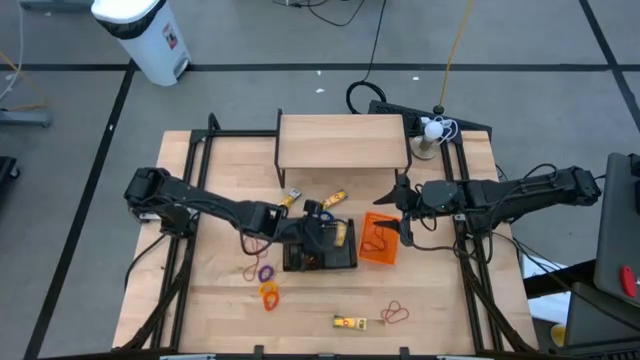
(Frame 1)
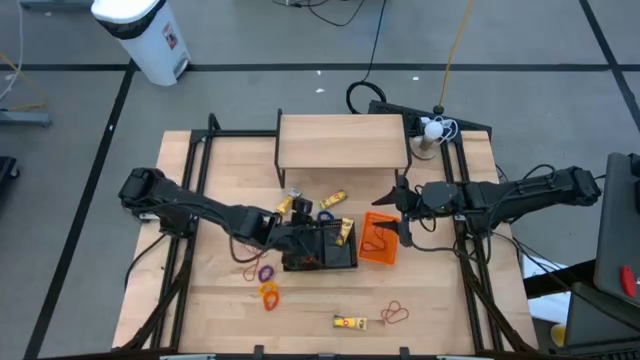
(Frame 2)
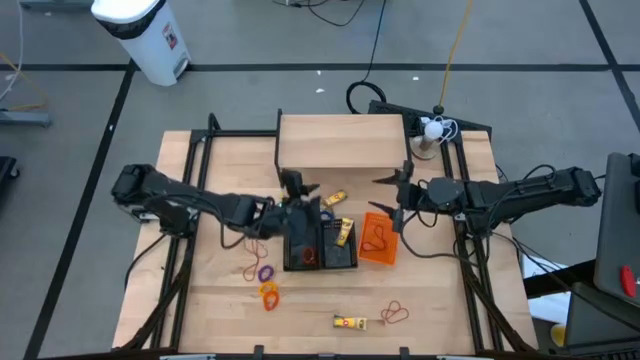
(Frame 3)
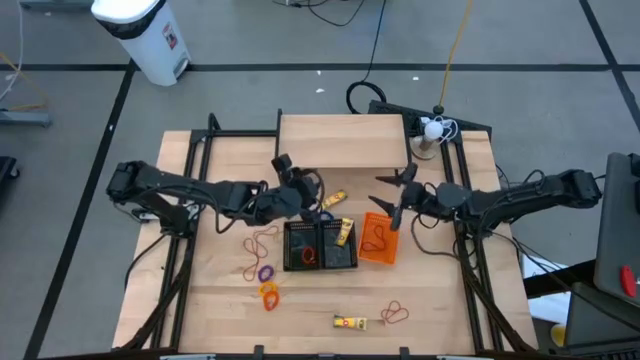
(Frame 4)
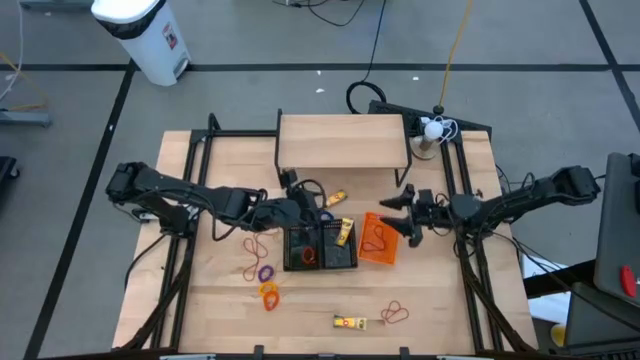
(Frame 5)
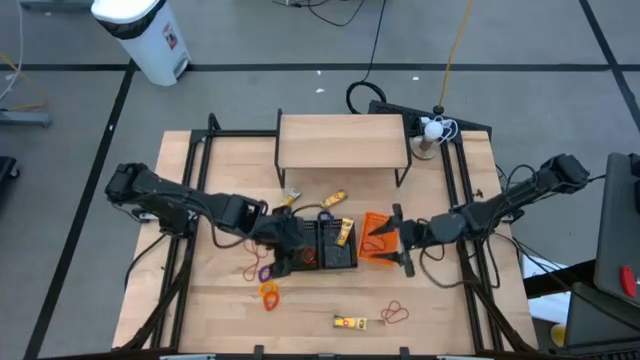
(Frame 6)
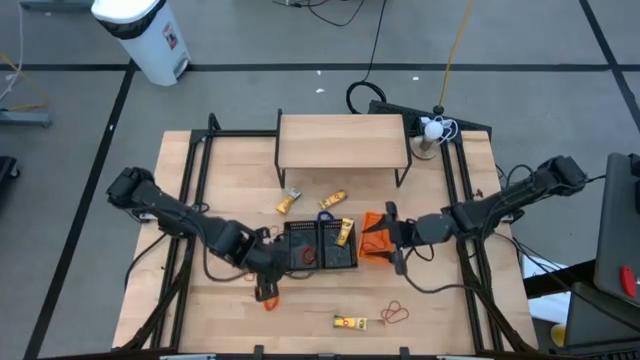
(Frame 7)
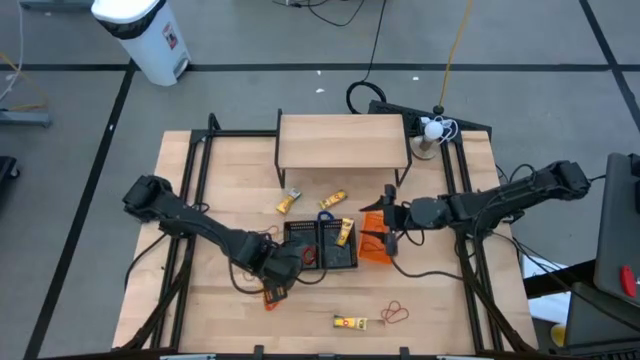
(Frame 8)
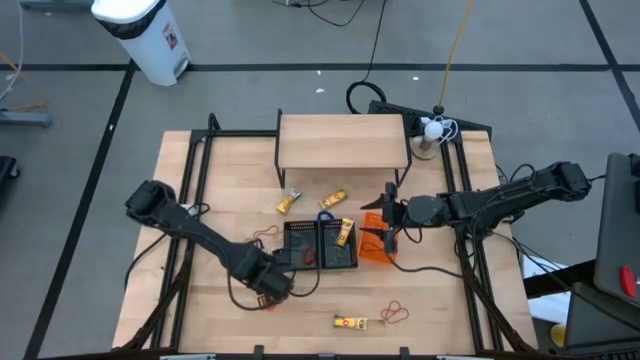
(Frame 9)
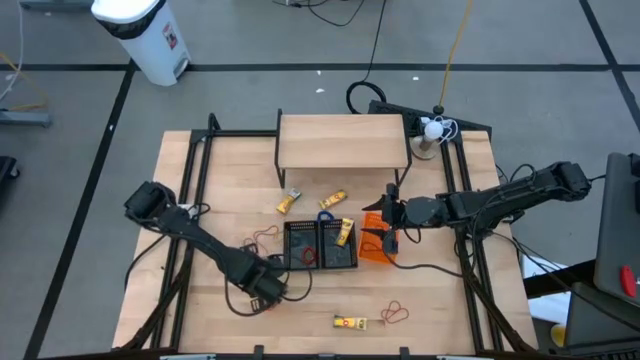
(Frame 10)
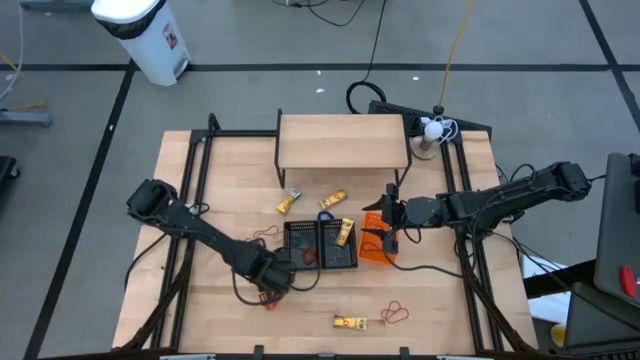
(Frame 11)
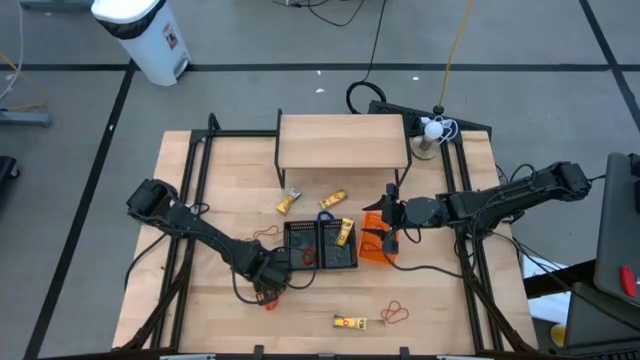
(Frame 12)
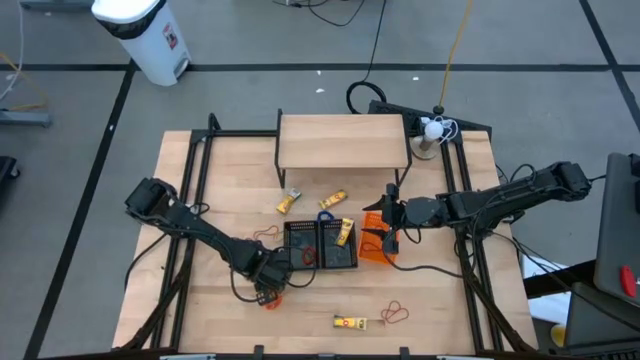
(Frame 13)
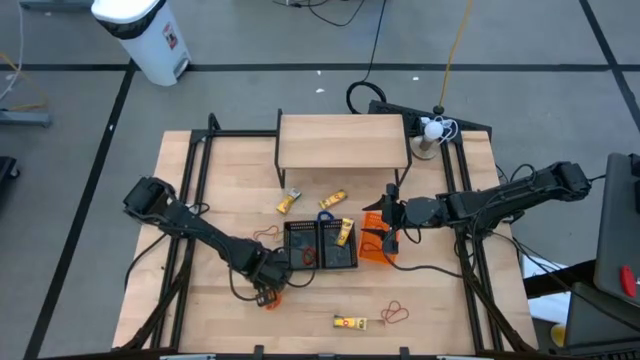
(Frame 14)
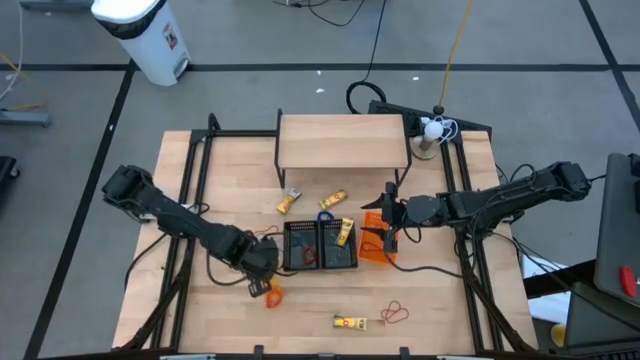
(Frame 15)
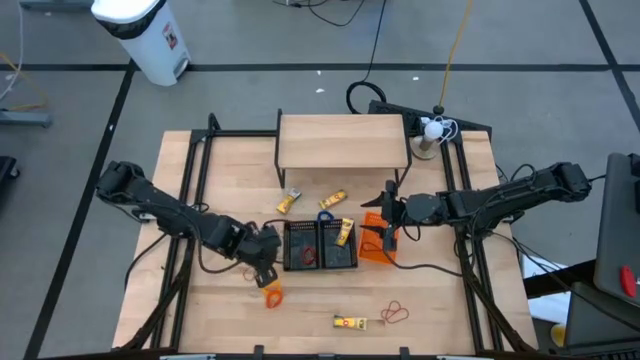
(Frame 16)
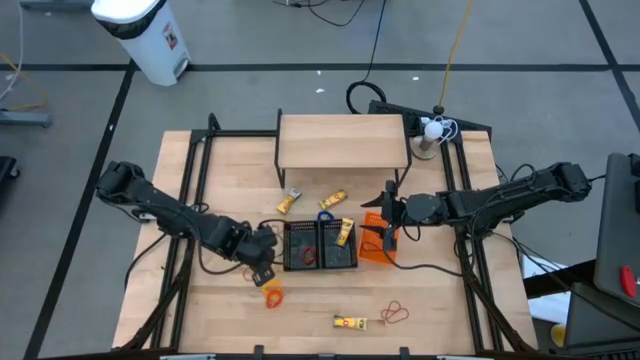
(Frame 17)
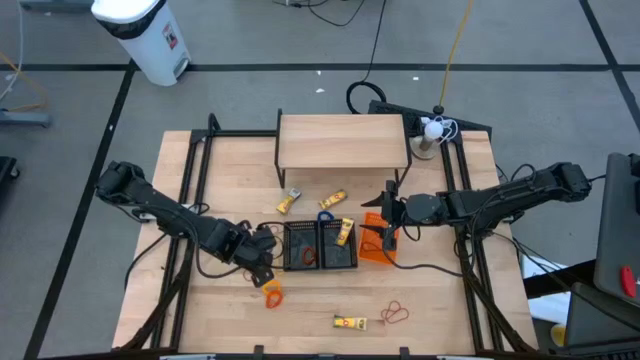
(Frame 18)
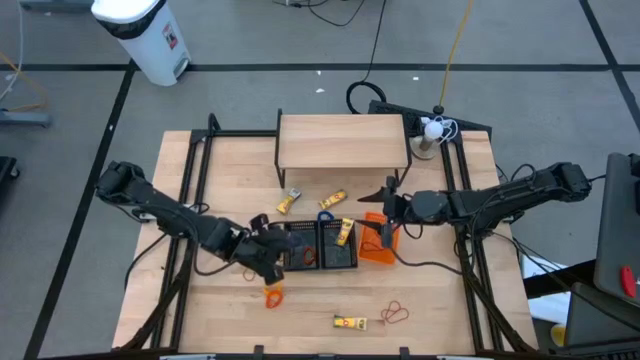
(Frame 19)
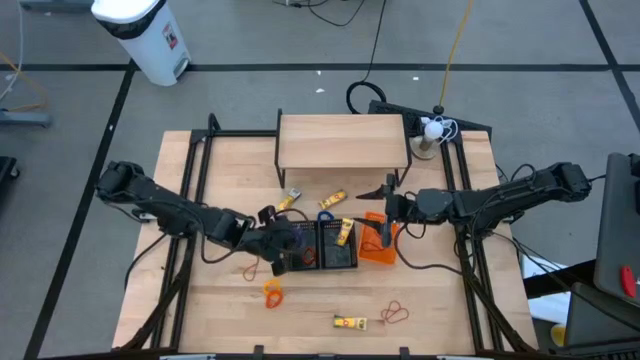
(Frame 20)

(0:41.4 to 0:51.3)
Task: Pick & Place Office Desk Supplies
Put the violet spring rubber band into the left black basket

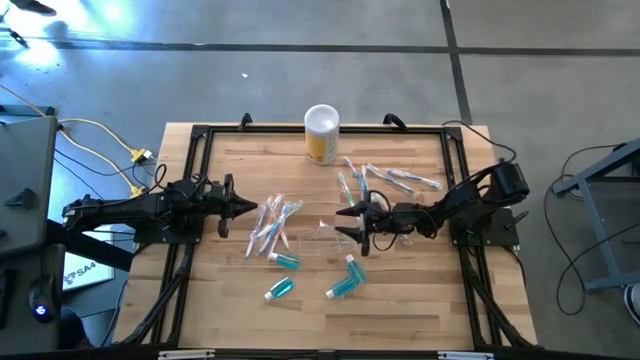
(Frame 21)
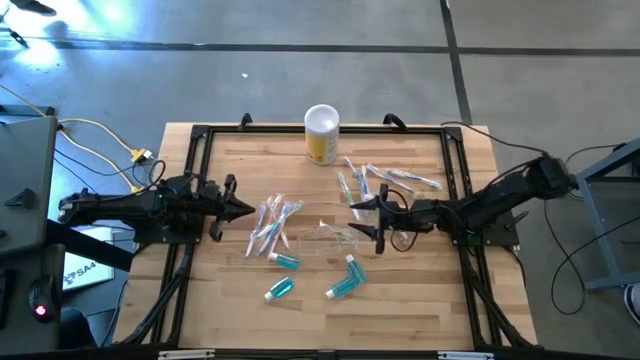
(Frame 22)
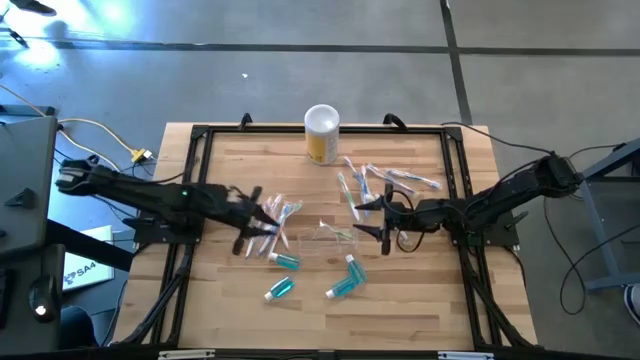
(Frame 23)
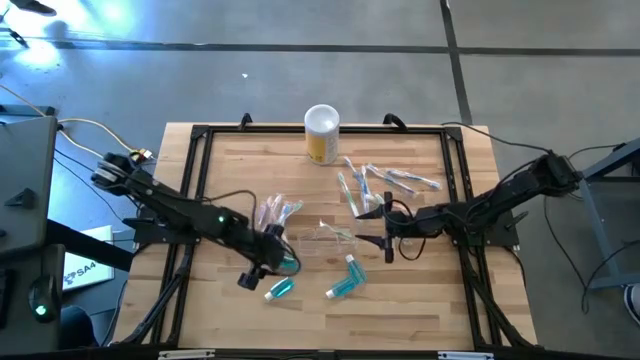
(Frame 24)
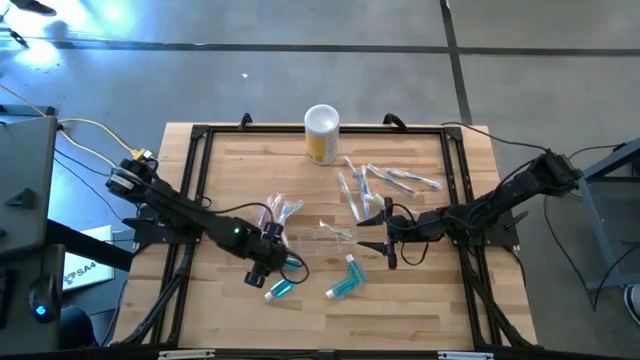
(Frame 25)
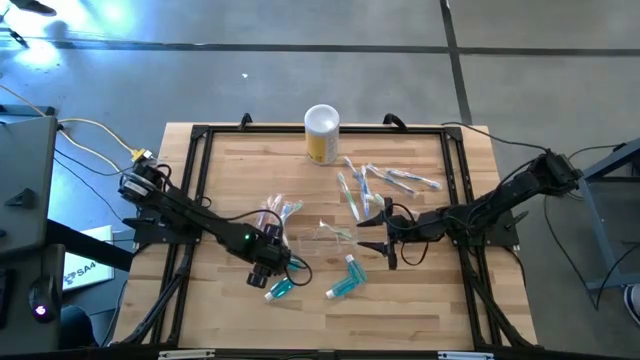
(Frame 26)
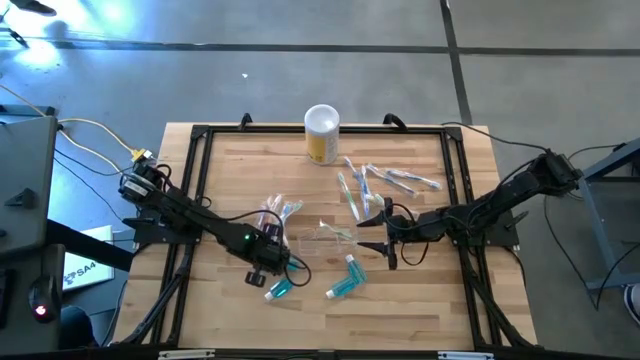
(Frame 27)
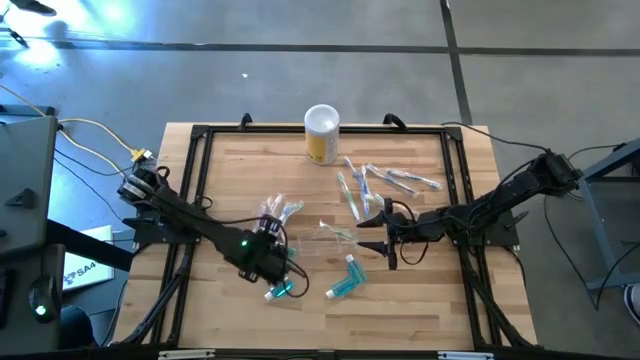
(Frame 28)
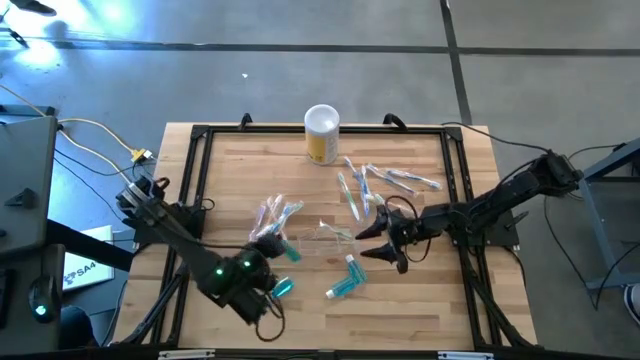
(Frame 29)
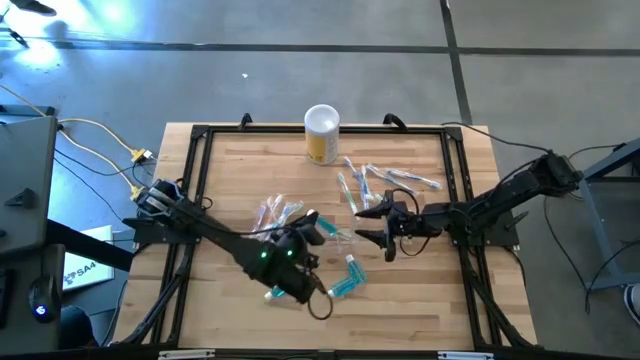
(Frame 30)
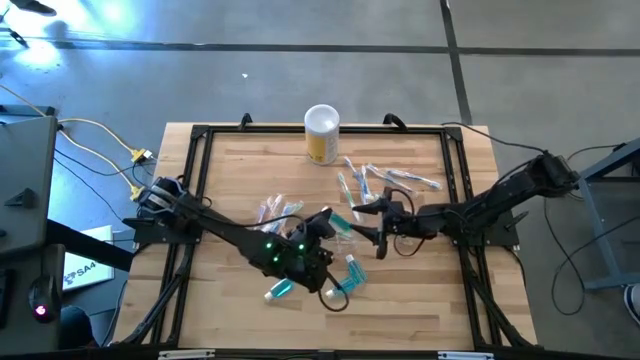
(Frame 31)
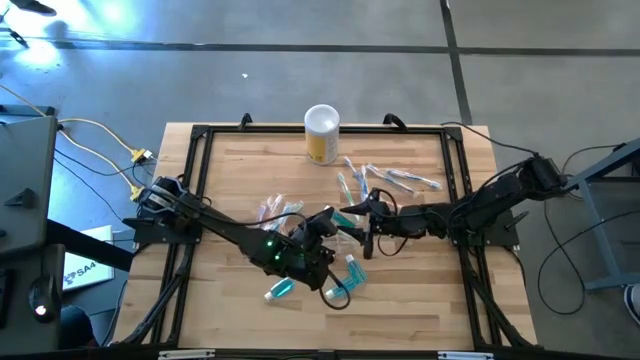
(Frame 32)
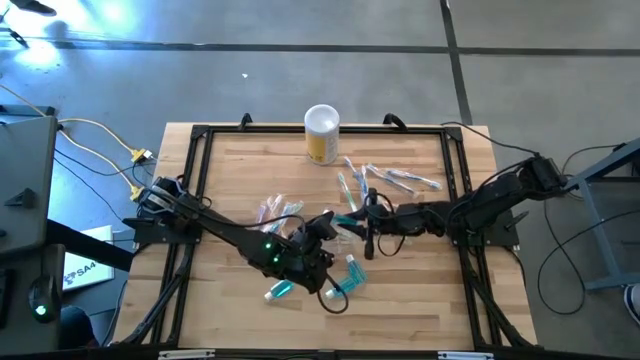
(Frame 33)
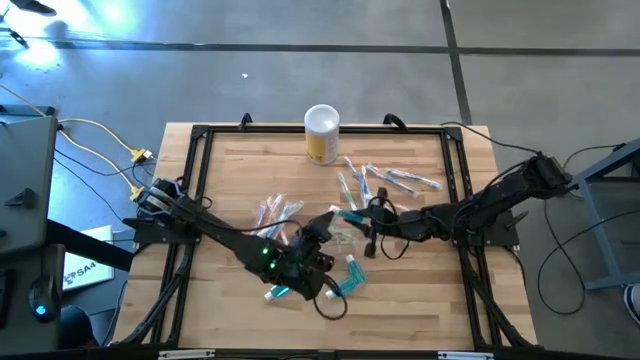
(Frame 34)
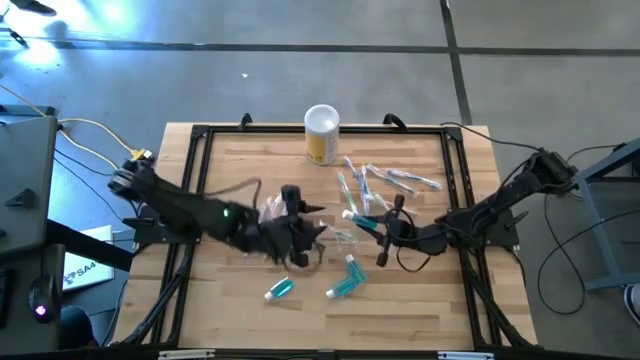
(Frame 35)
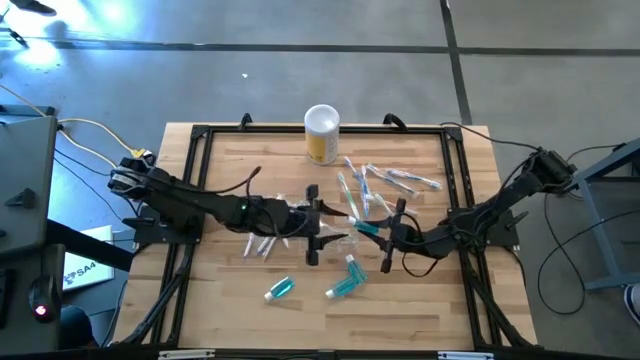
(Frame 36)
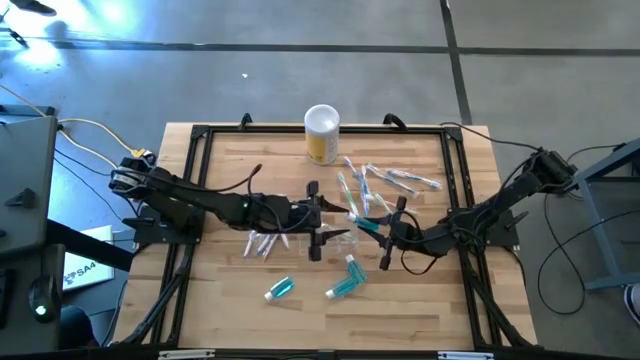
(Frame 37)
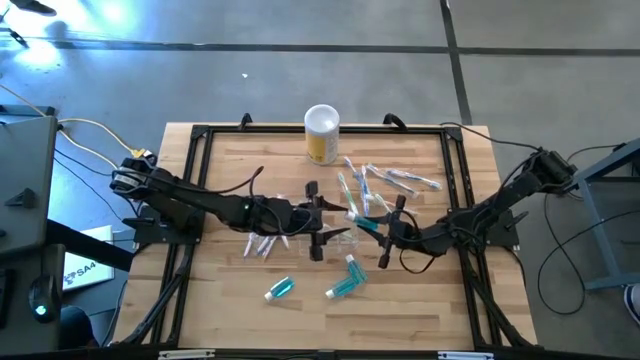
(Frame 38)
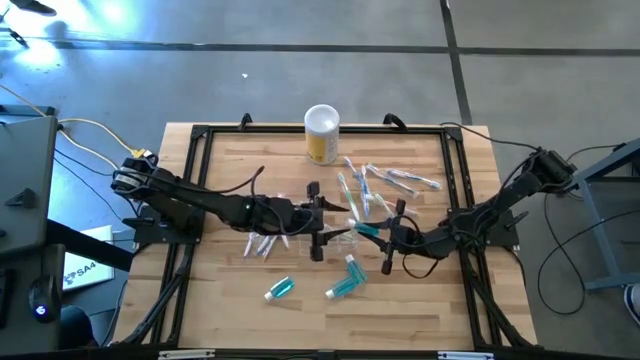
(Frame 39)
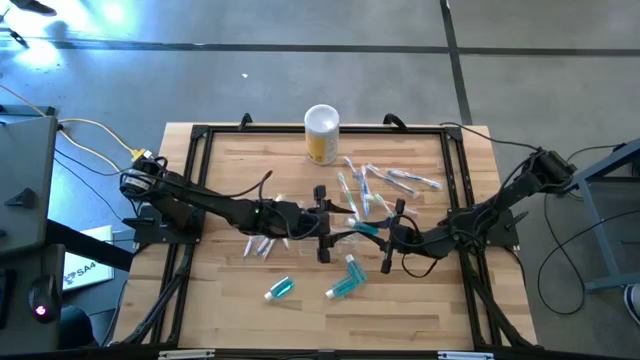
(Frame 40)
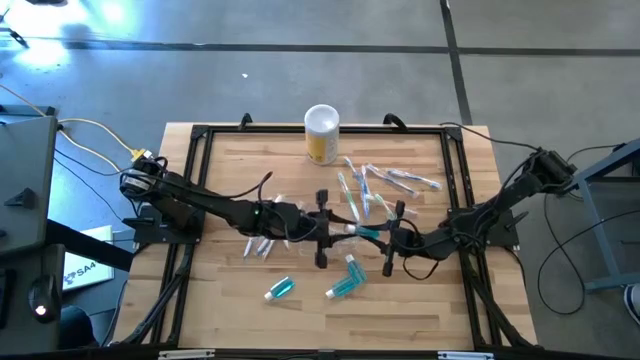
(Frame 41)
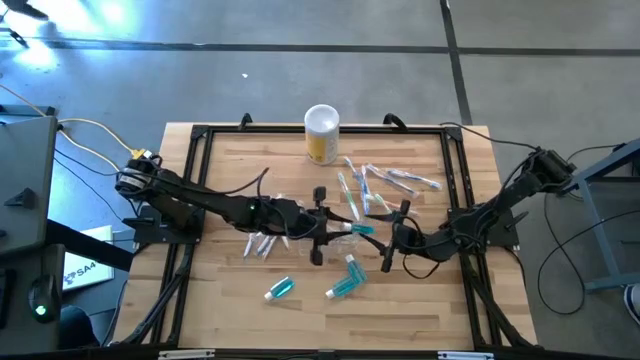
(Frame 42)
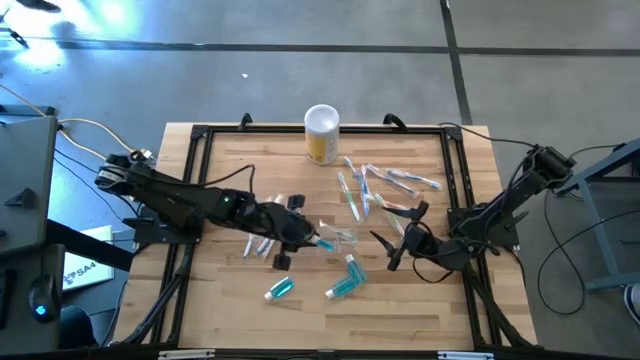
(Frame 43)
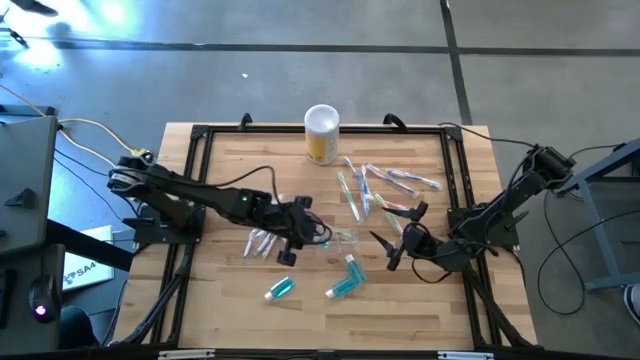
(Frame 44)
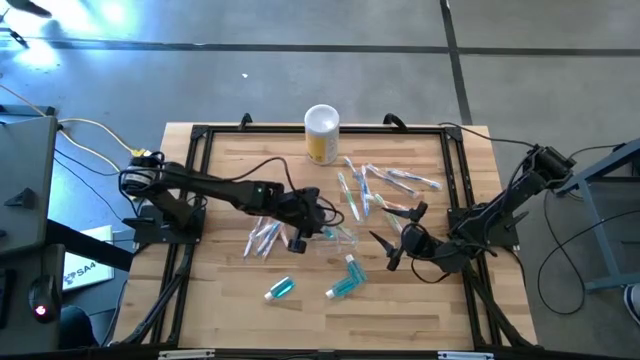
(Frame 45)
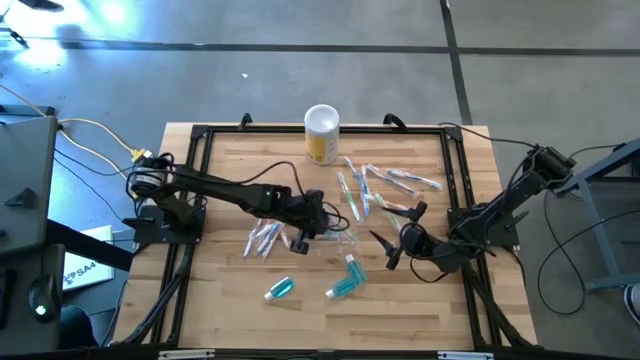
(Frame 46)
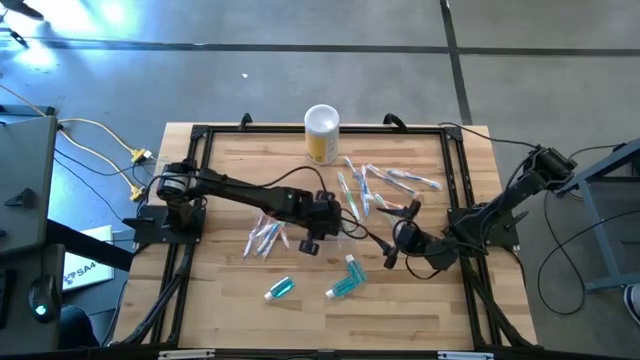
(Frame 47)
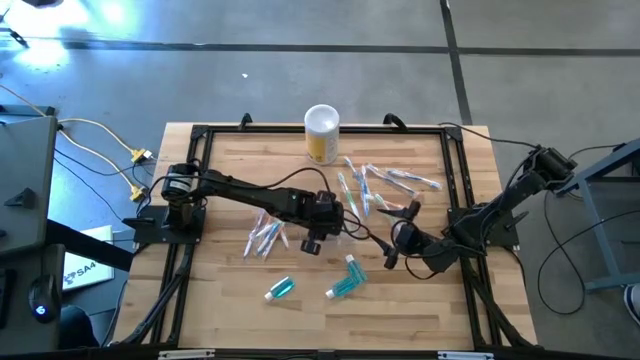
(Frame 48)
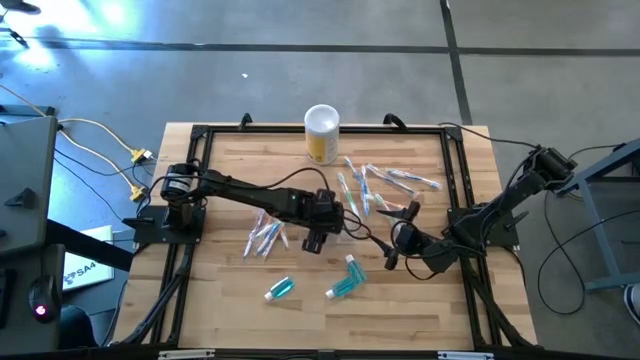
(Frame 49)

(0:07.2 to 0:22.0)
Task: Pick & Place toothbrushing station
Put the blue mouthwash in the transparent organizer
